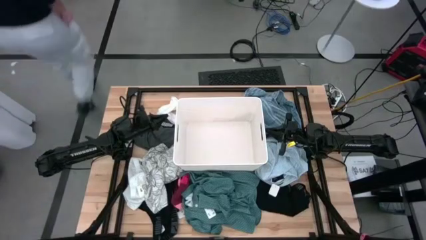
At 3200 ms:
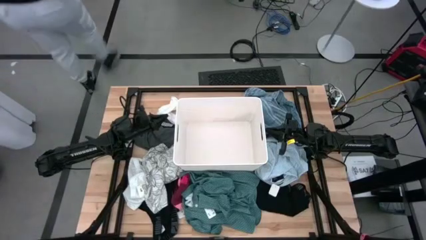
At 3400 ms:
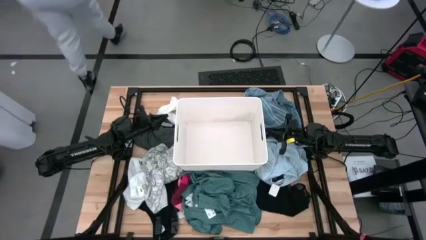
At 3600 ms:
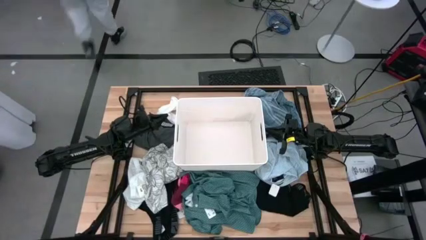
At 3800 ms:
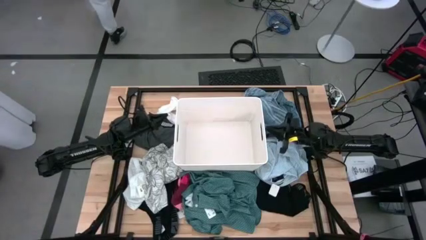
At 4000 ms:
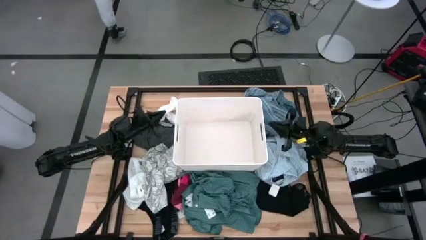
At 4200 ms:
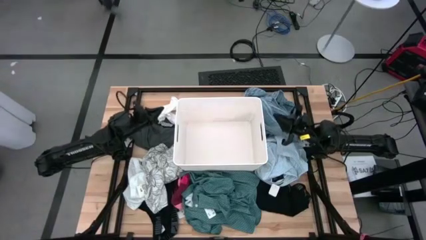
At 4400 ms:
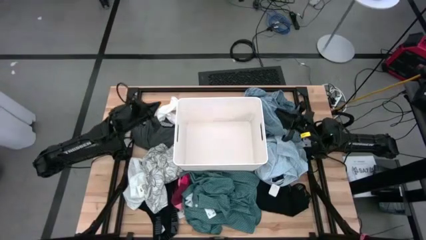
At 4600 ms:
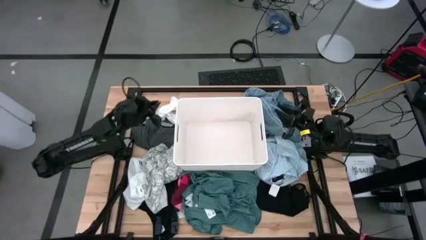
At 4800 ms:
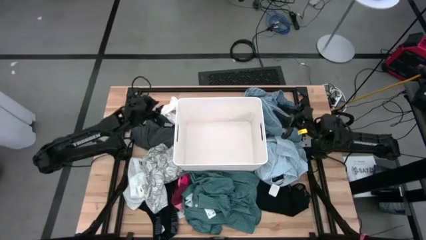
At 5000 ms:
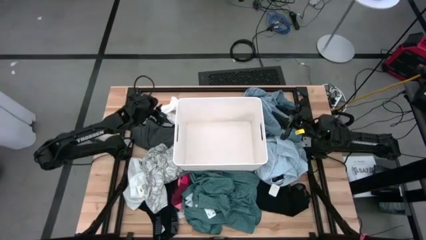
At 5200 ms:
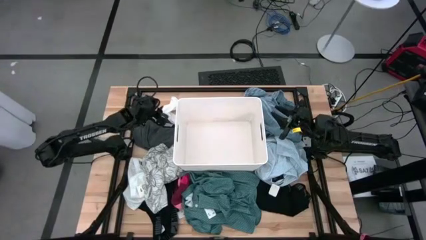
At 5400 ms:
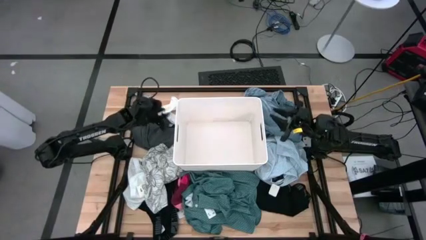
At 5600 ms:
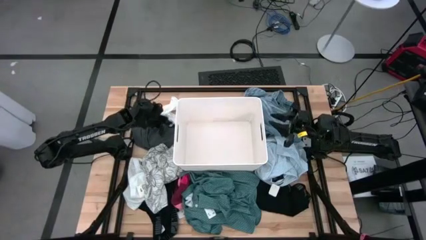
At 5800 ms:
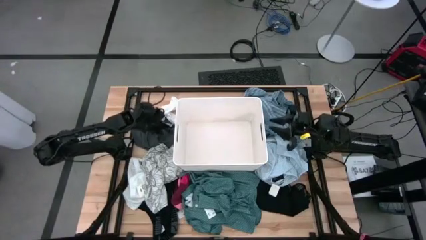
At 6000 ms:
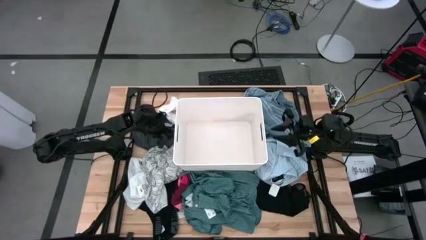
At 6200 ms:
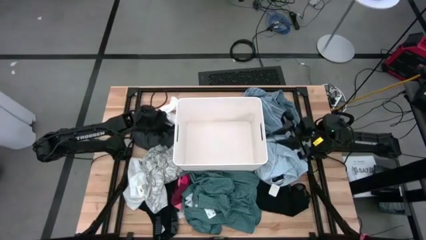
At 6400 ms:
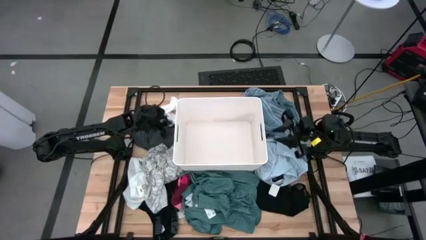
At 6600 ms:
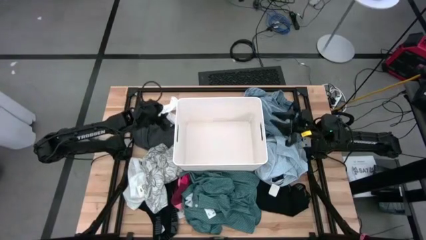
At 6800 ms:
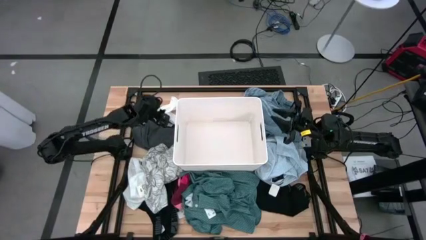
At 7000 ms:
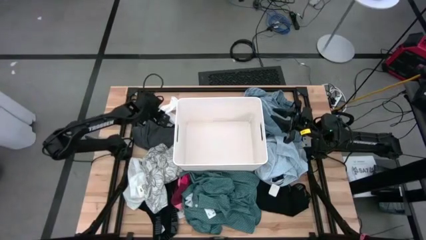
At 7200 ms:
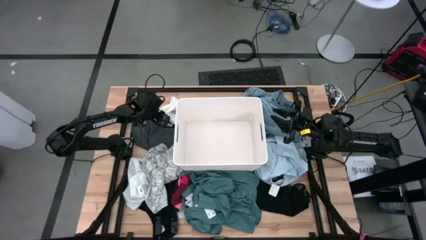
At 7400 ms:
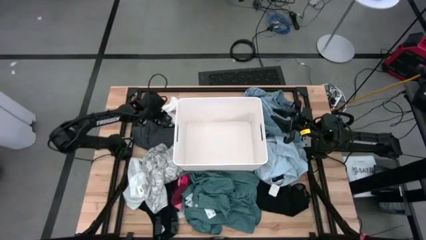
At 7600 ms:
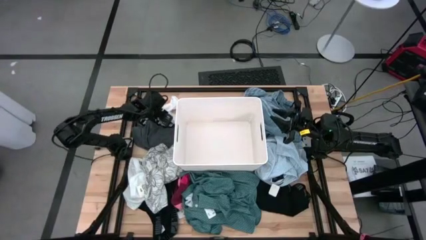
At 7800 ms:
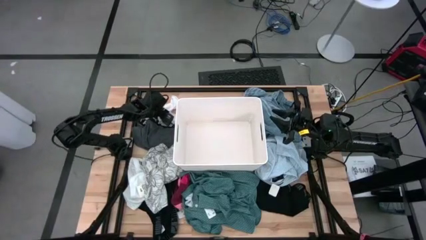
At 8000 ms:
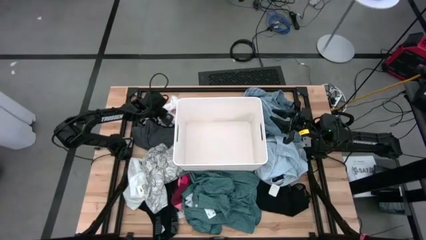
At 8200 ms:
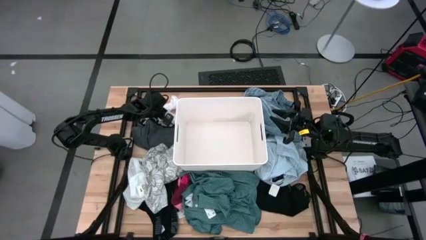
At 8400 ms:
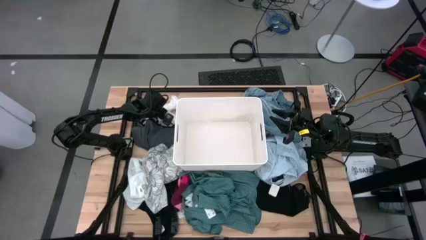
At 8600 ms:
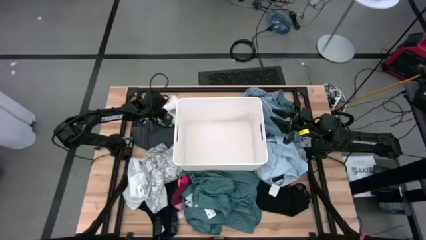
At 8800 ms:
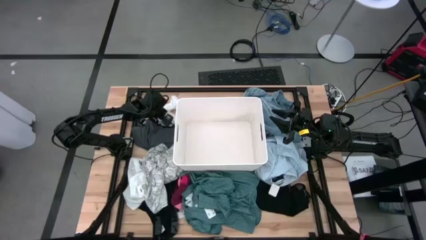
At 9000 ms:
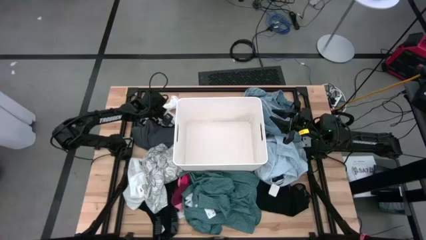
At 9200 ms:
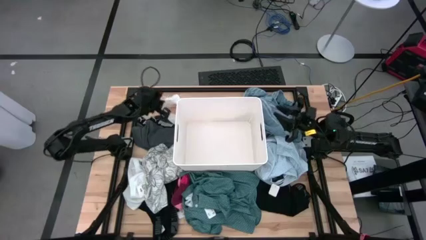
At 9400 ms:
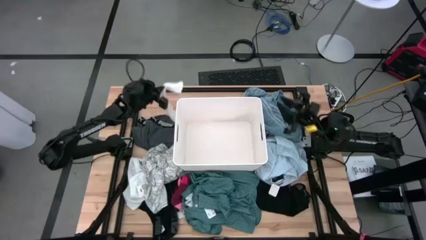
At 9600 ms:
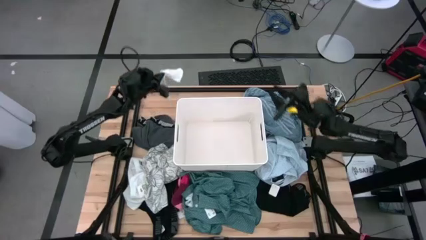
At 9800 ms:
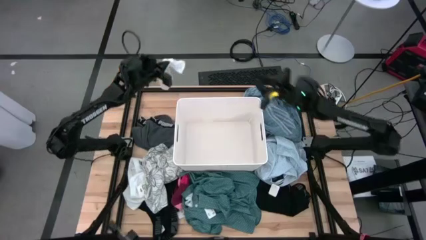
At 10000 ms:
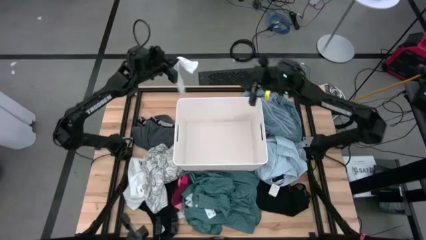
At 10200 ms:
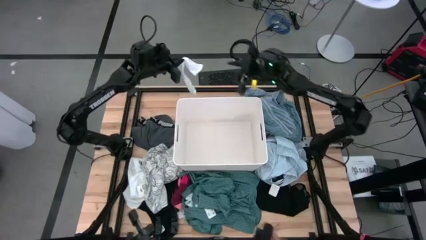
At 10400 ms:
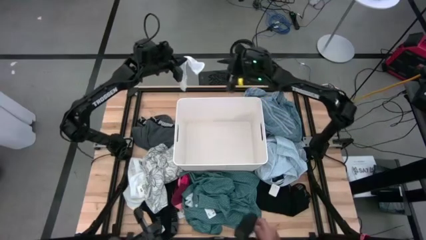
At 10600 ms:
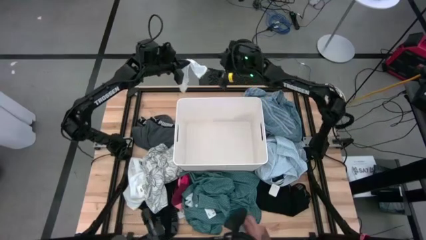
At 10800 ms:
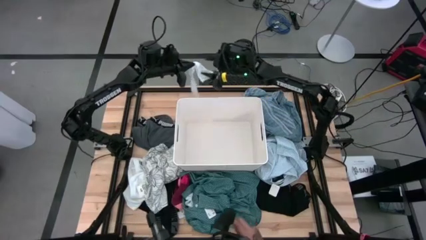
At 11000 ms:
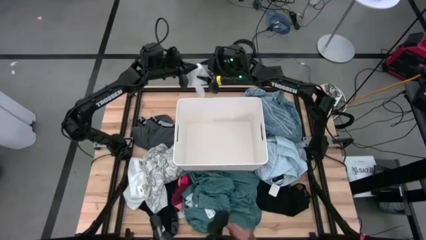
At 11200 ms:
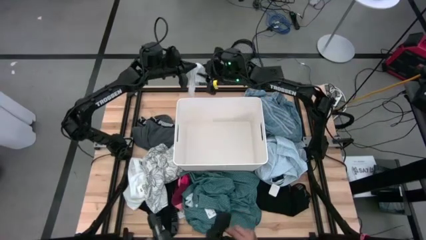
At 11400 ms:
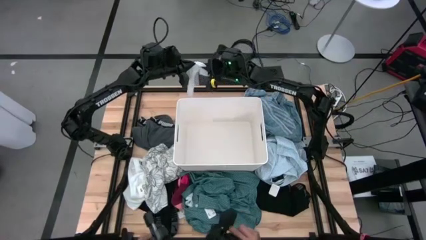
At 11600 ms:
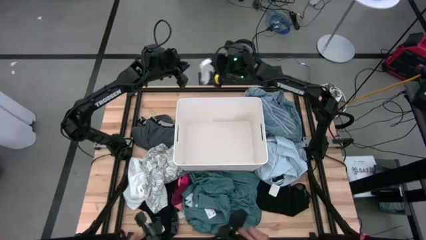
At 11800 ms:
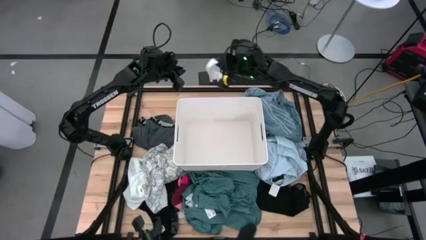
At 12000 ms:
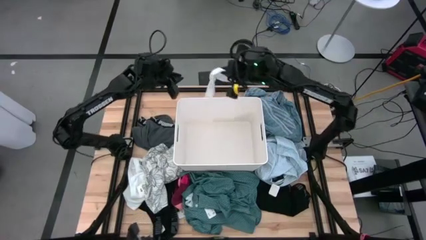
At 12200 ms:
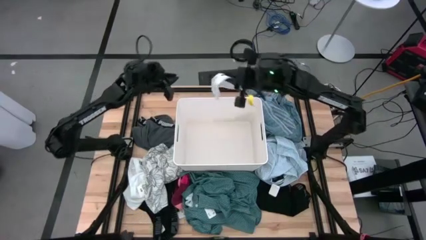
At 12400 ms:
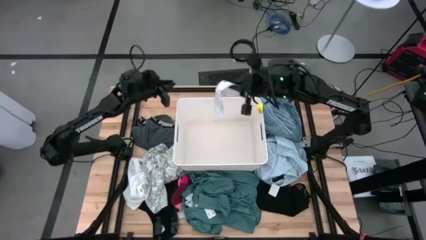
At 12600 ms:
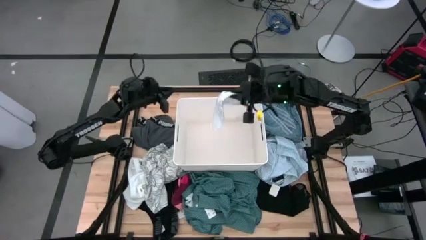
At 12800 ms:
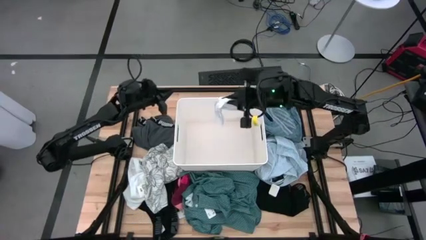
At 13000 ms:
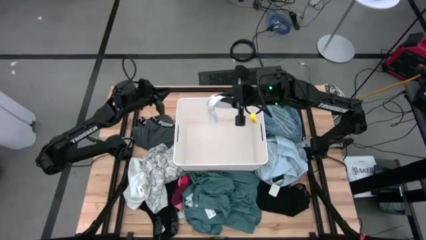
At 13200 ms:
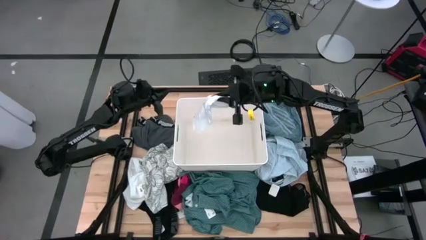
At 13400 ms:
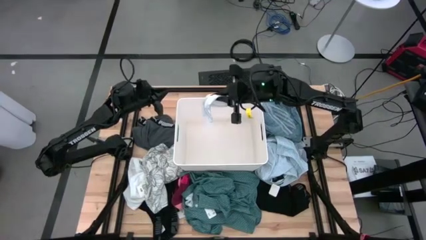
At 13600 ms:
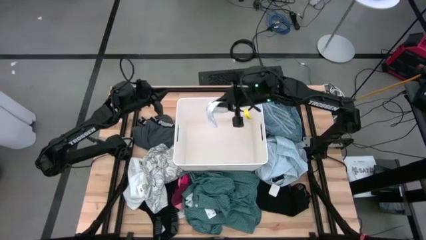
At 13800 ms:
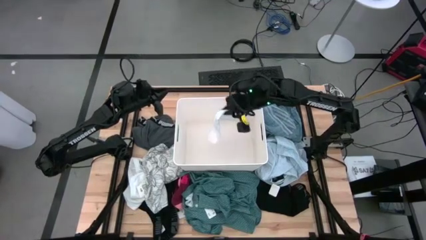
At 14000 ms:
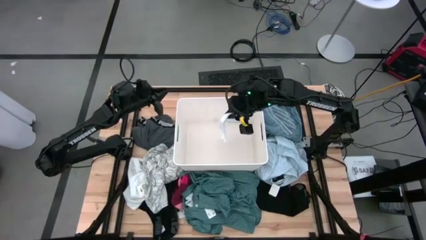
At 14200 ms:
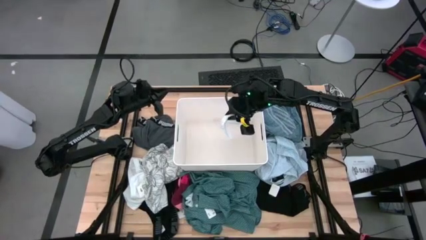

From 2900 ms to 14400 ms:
Task: Sort clothes
Put the white sock into the white laundry organizer
